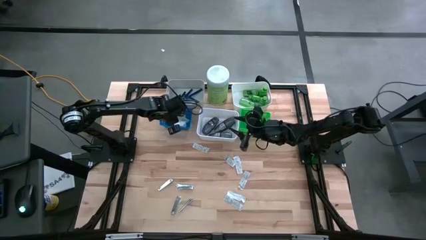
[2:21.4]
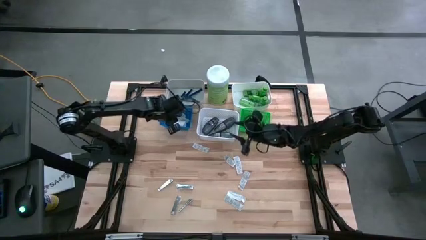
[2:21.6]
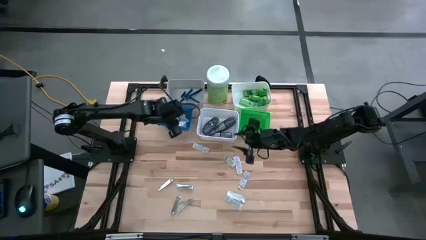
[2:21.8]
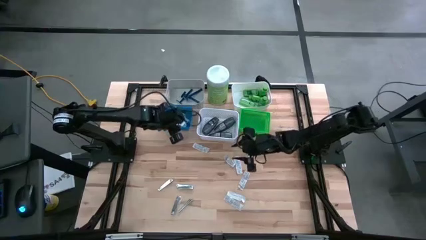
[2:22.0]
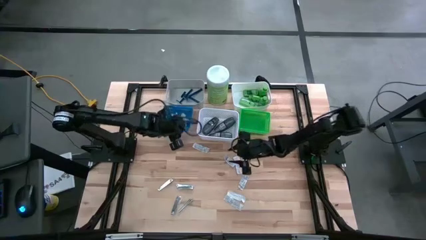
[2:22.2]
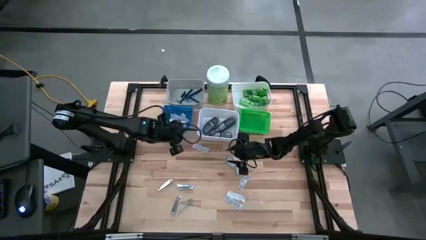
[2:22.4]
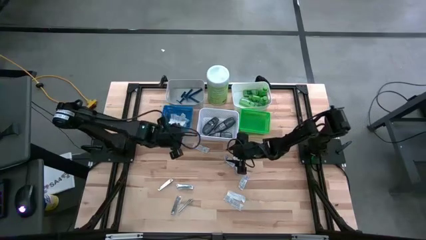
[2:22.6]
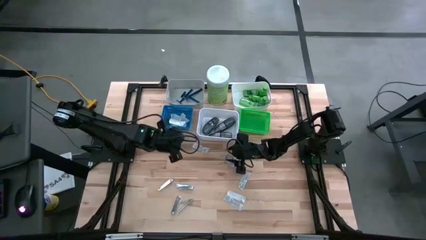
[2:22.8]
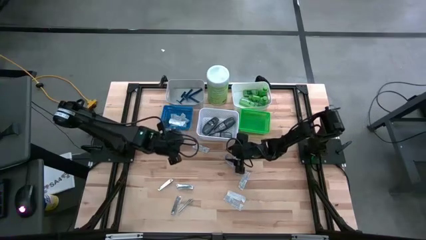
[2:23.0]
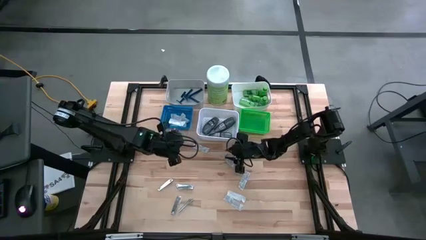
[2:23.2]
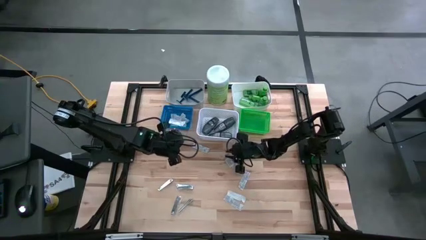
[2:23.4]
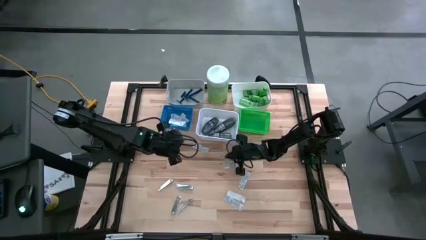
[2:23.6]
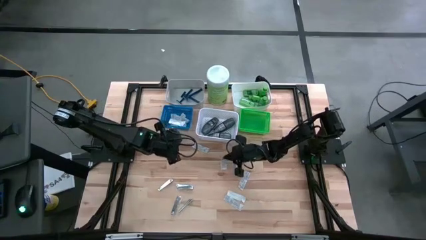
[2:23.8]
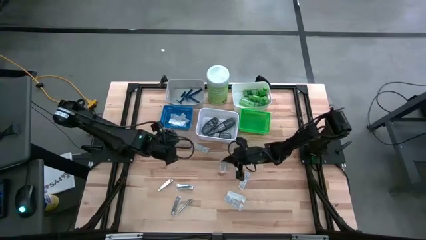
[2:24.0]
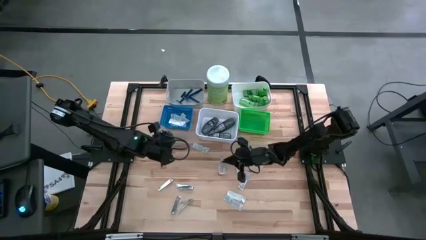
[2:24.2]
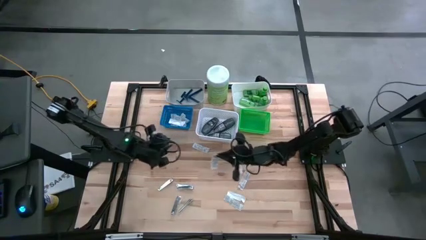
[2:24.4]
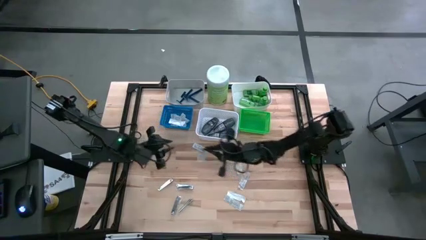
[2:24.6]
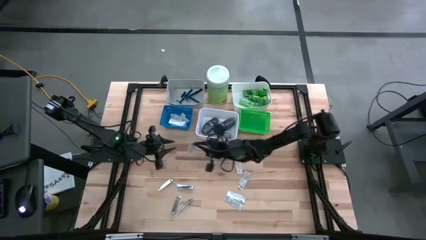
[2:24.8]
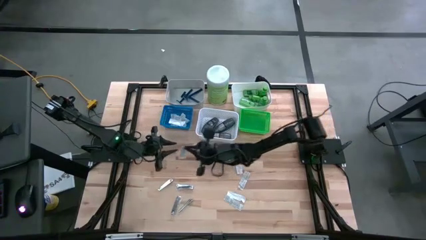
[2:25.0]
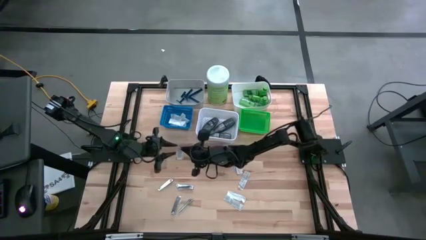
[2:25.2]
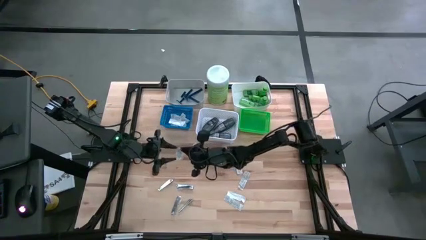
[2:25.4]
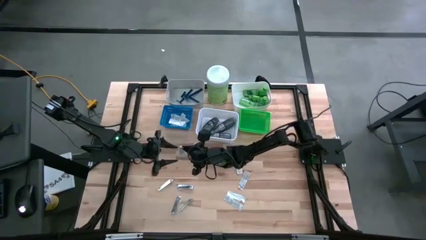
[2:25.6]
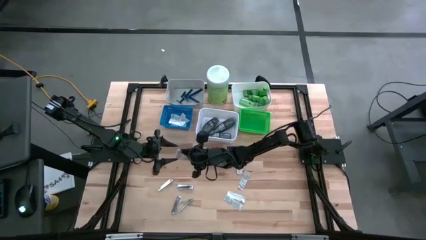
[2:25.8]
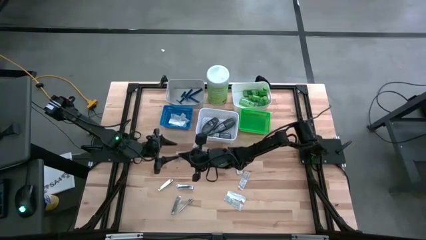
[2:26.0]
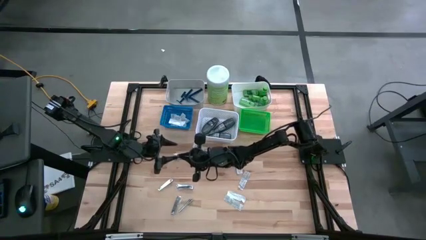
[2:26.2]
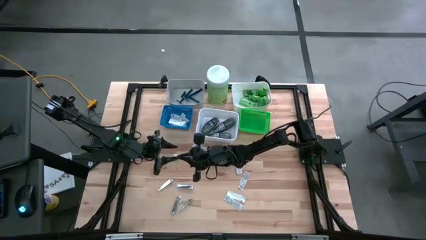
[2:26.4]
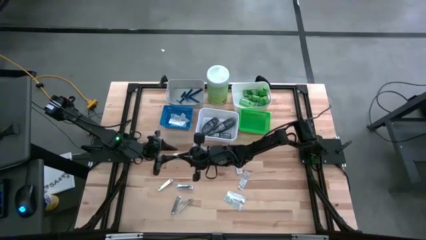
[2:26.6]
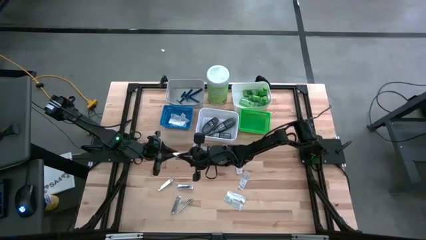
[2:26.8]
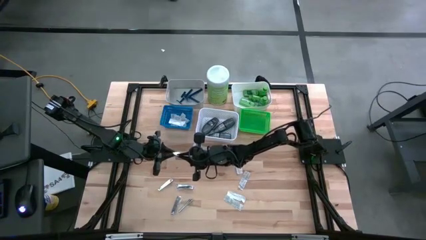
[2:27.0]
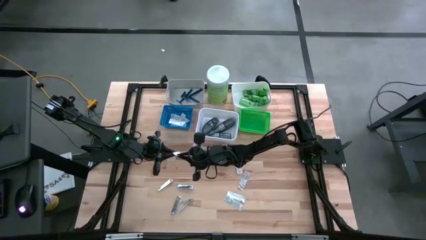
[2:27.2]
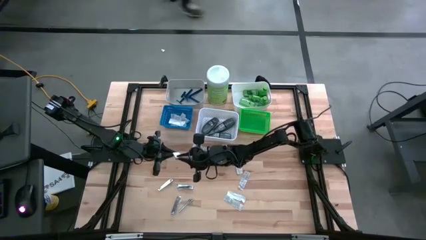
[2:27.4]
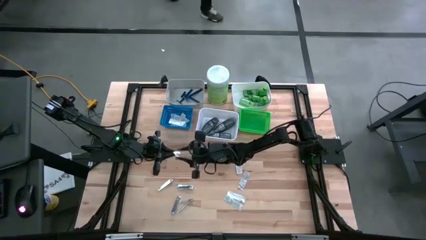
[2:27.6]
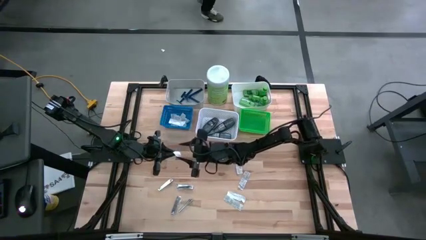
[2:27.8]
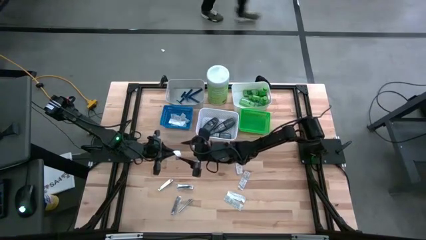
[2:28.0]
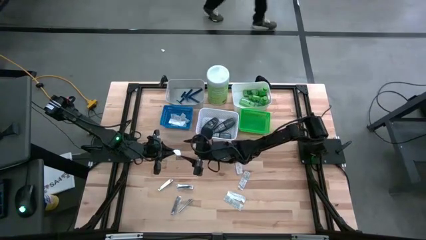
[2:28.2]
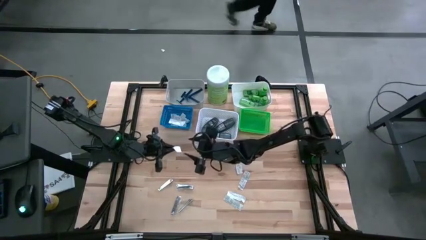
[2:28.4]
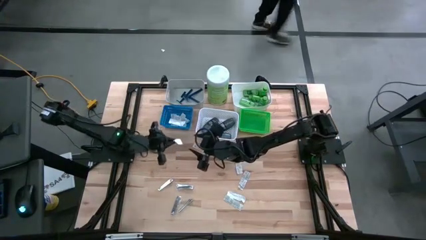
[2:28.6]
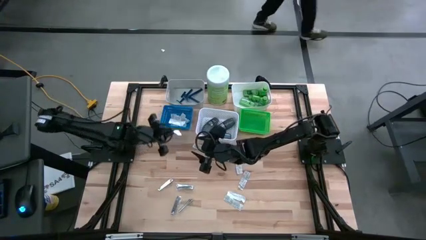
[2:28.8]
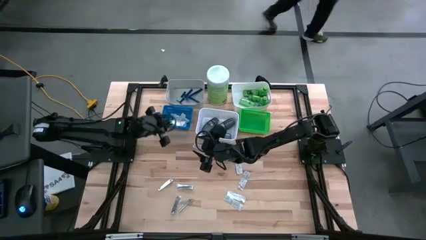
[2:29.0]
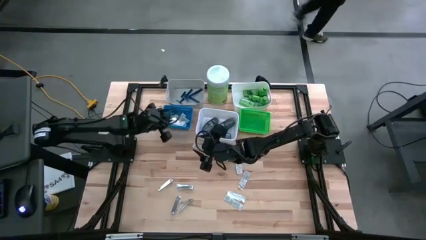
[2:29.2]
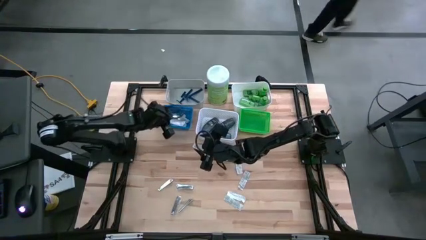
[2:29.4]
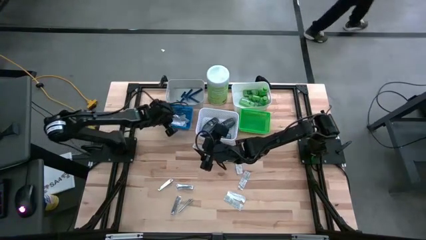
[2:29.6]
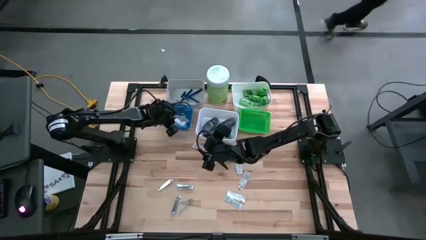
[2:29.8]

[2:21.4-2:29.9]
Task: Pick & Place Travel size toiletries
Put the white bandage into the blue bin
